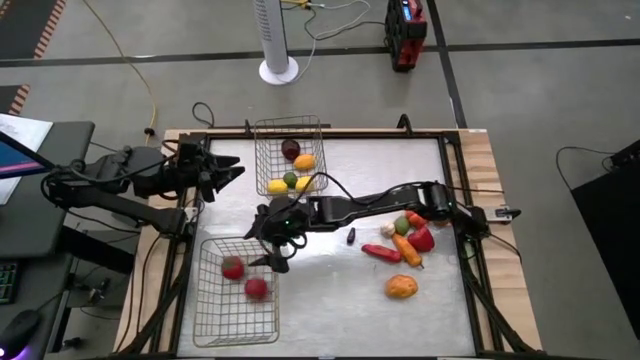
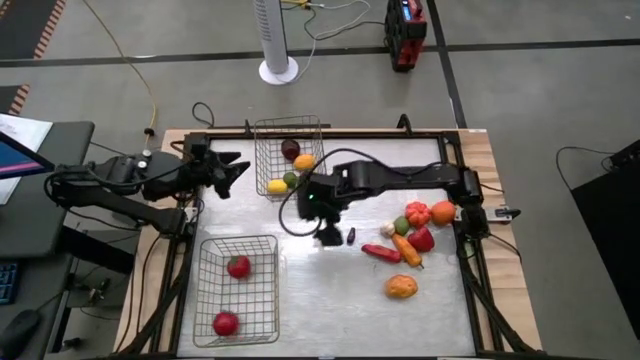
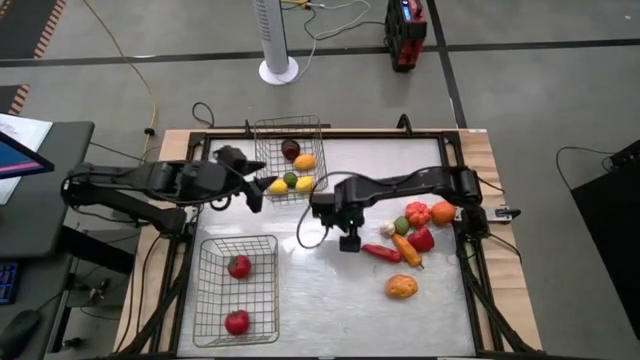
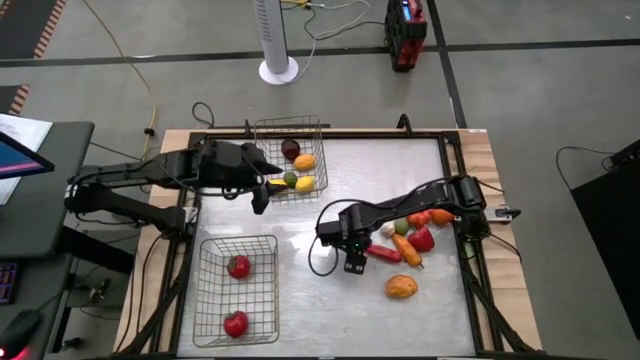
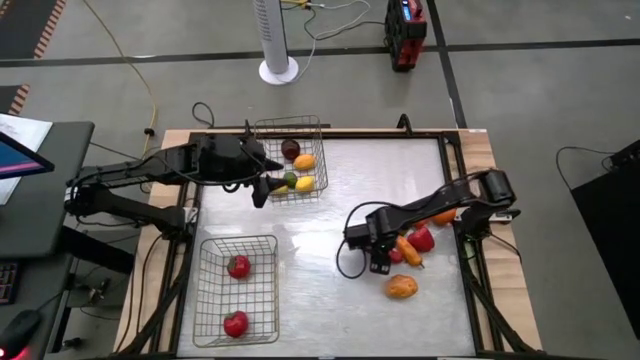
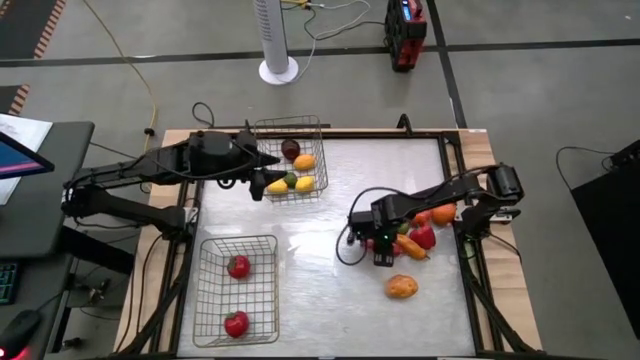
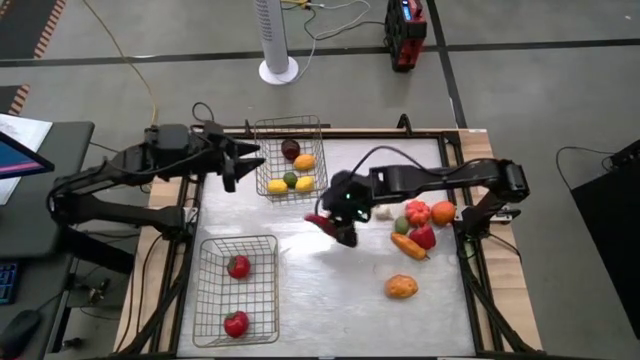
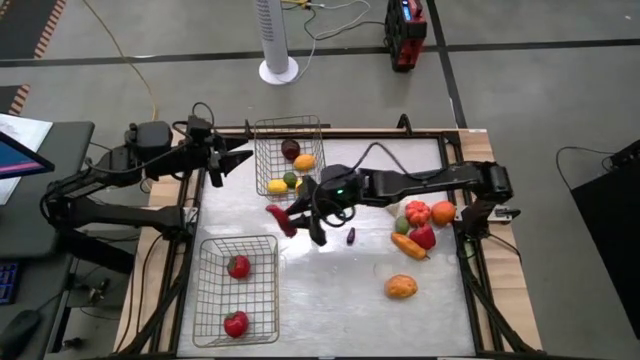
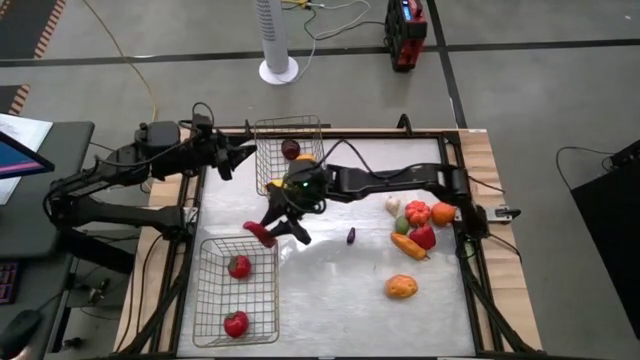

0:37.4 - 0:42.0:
Task: Sort produce into baskets
Put the red chili pepper into the bottom wire basket

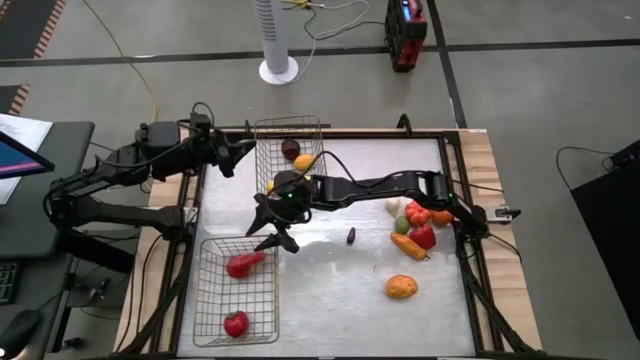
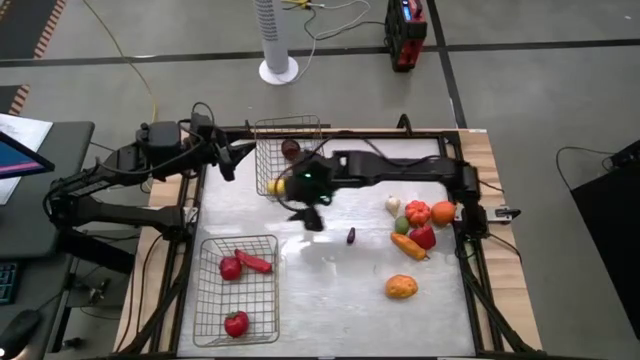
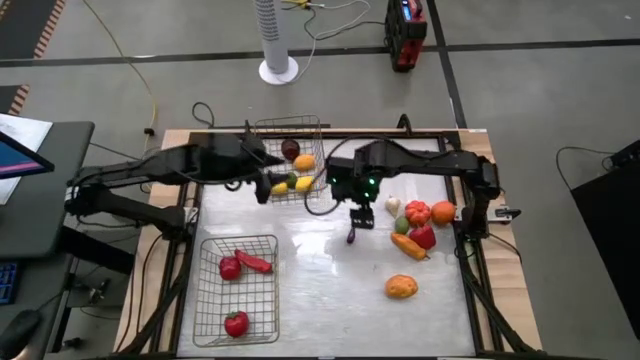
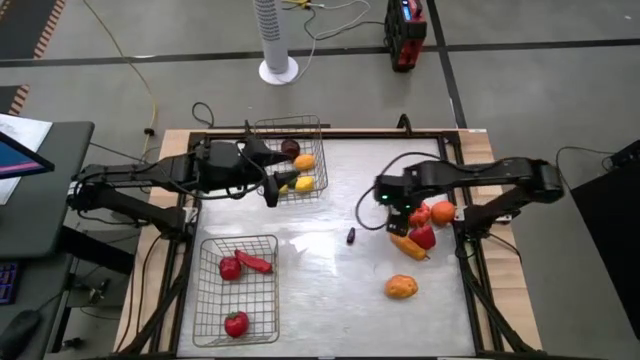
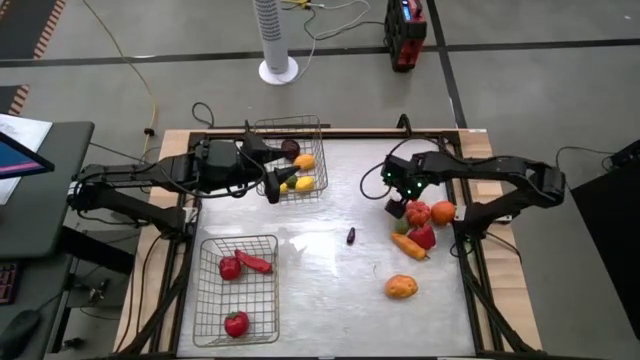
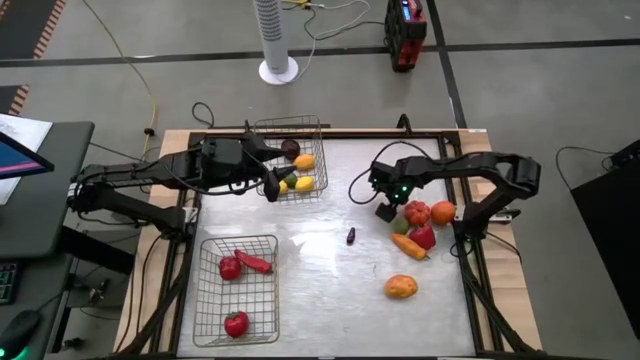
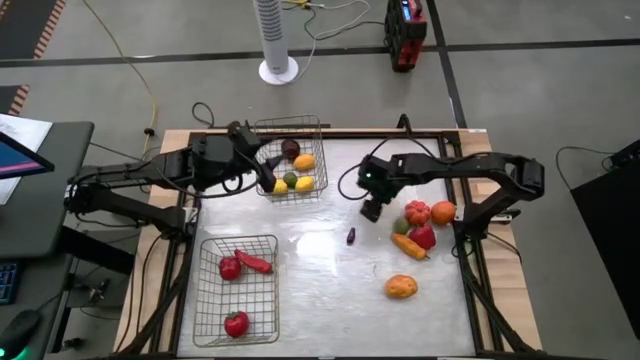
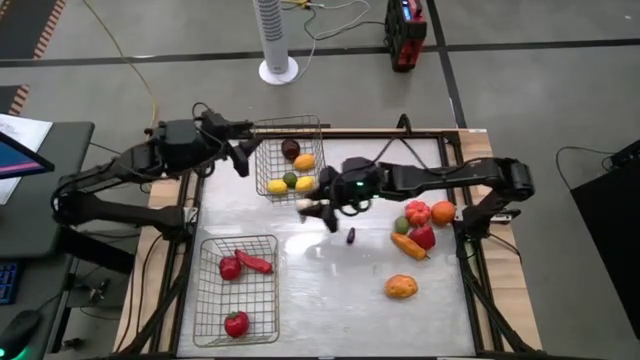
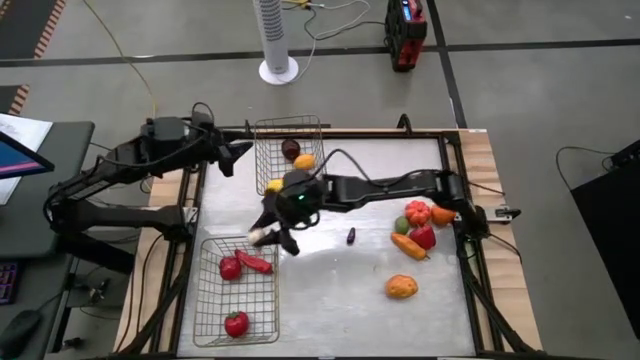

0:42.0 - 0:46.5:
Put the white garlic into the bottom wire basket

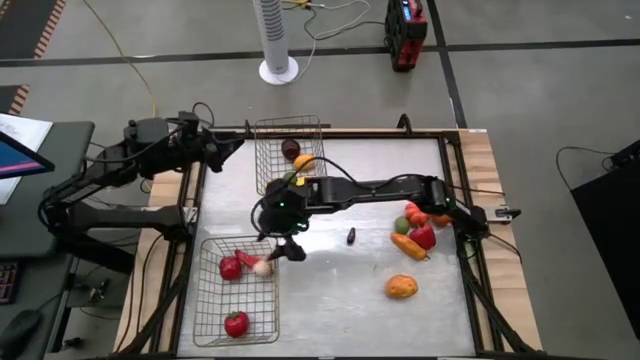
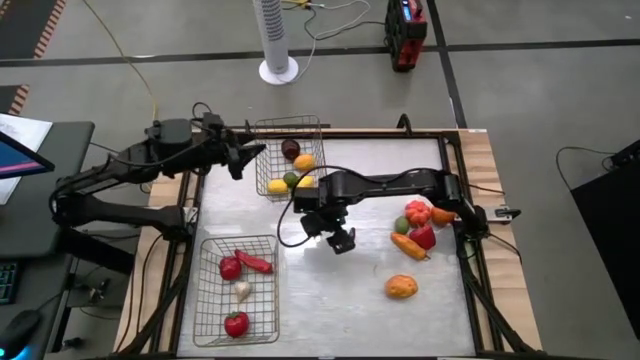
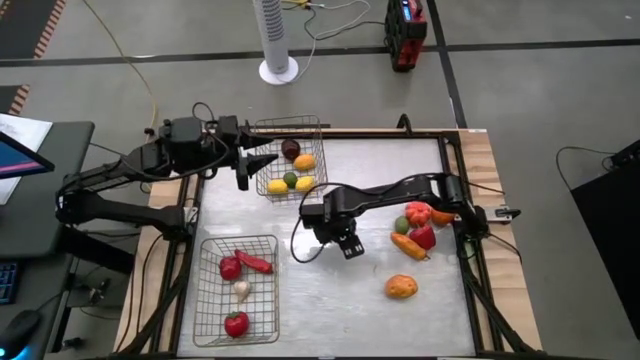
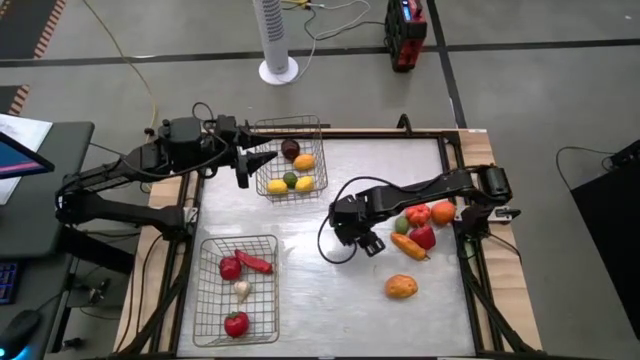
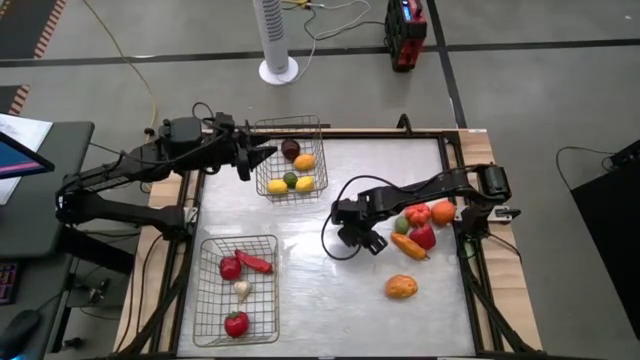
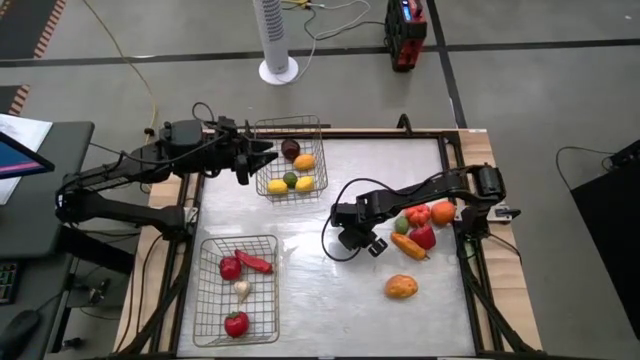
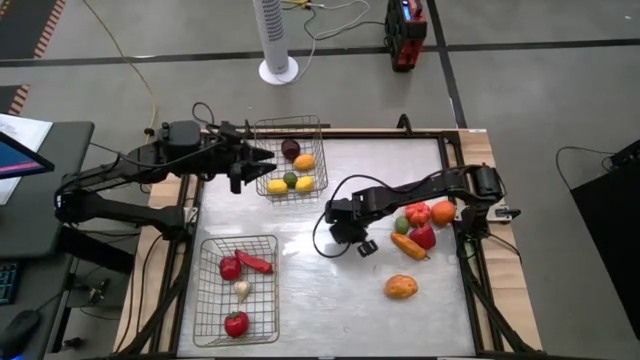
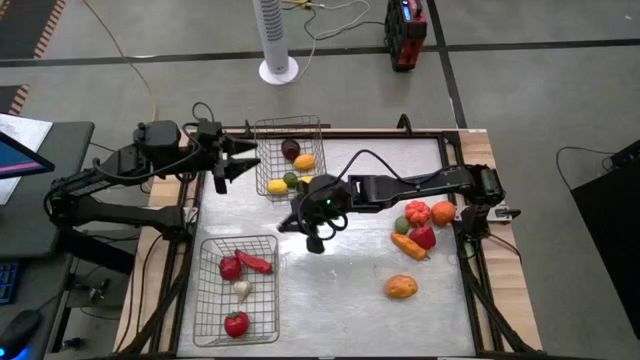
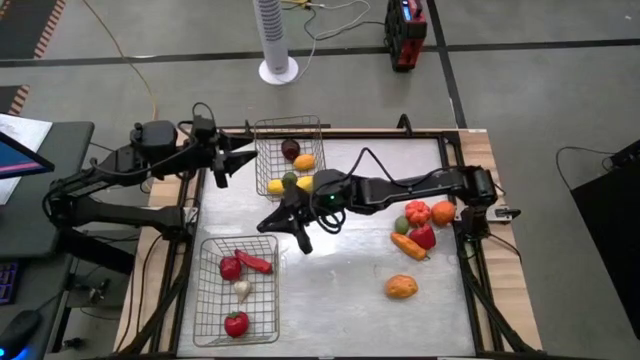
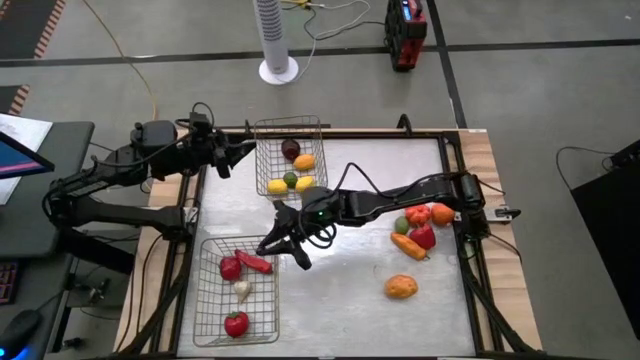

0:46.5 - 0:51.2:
Put the purple eggplant into the bottom wire basket

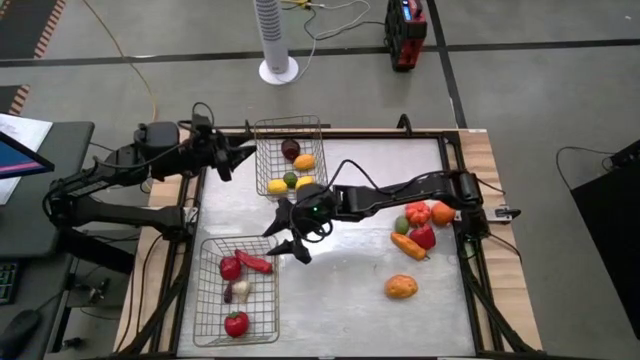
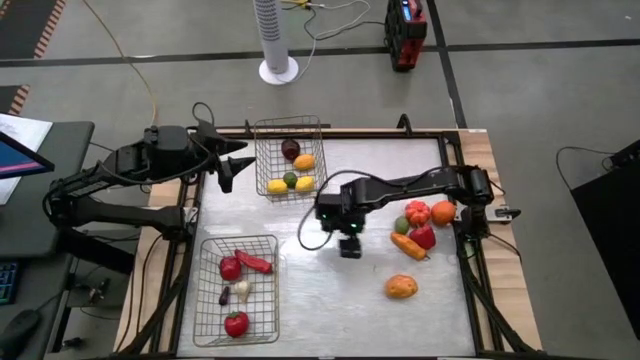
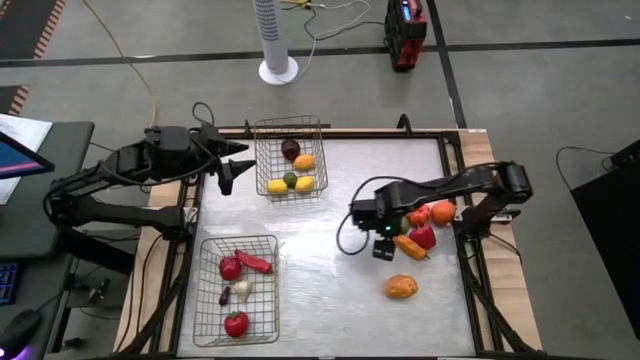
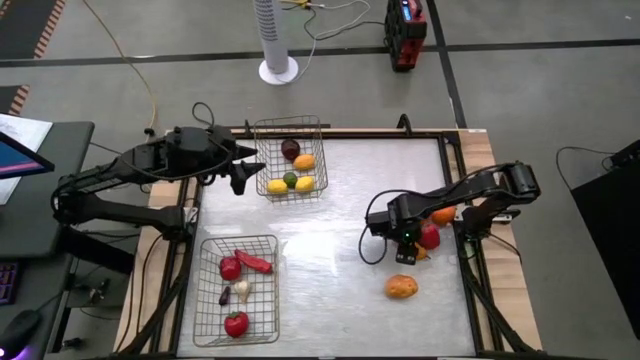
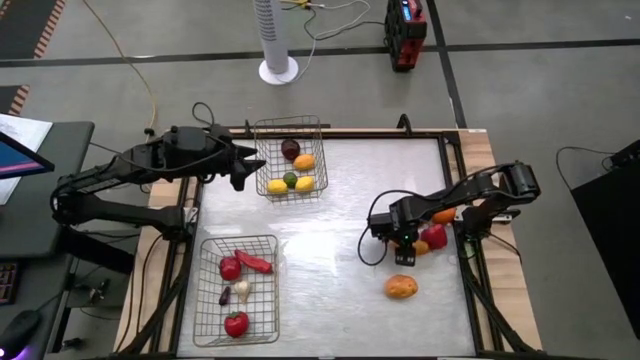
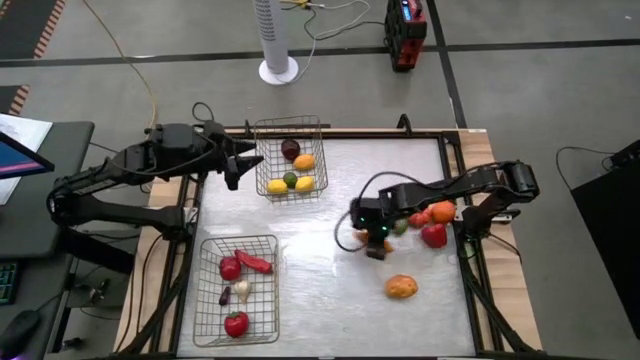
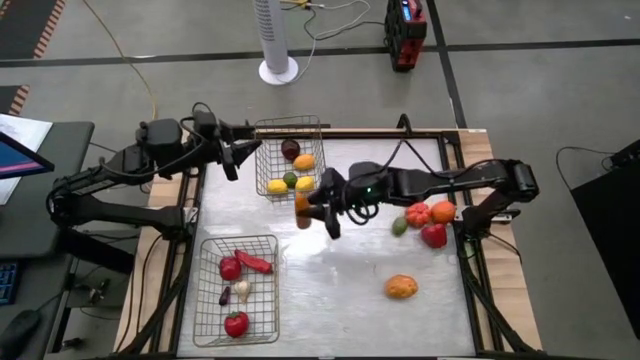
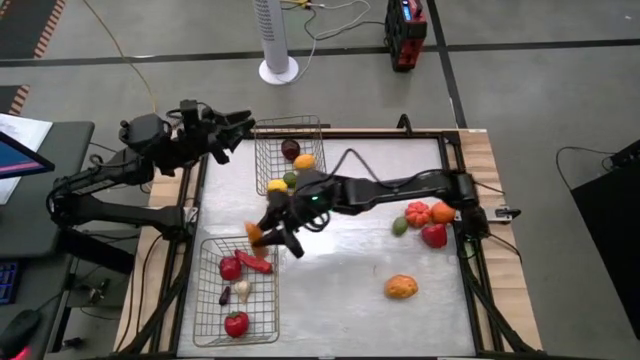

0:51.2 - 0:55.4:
Put the yellow pepper into the bottom wire basket

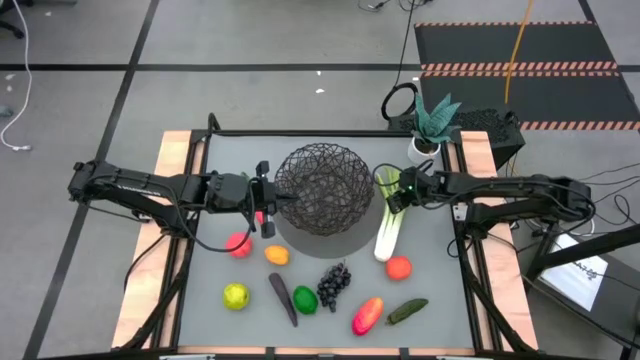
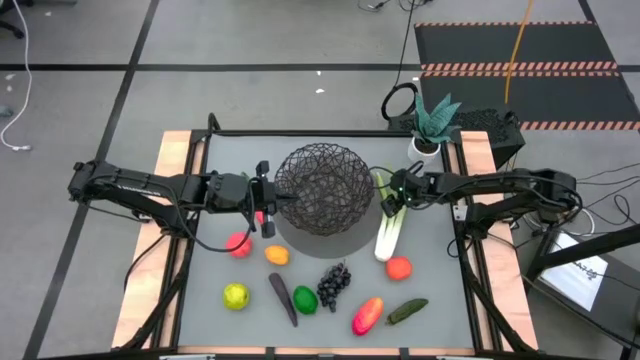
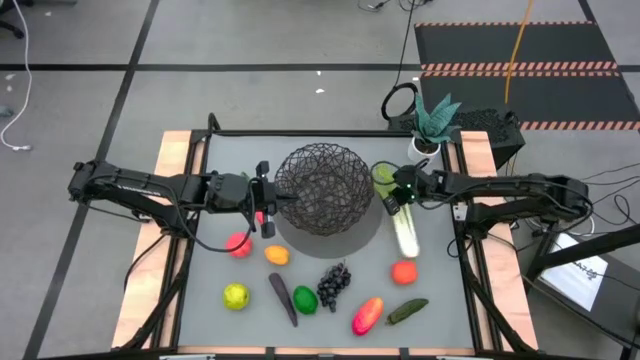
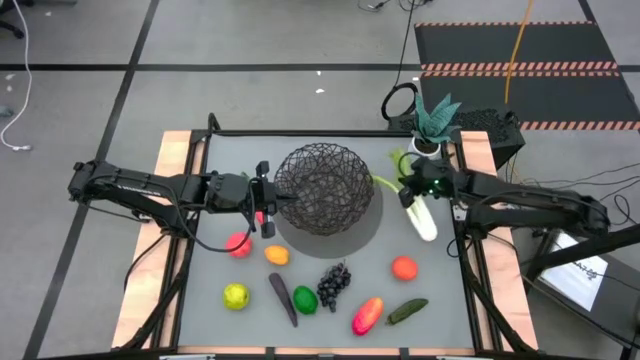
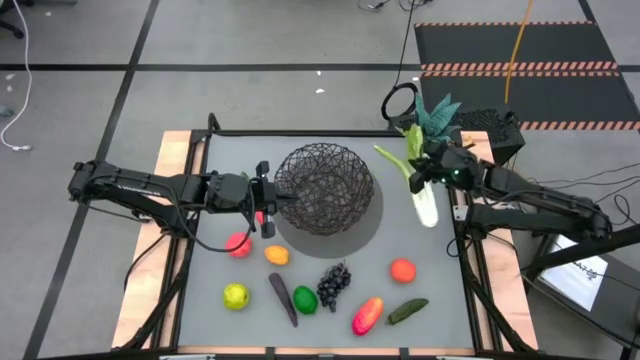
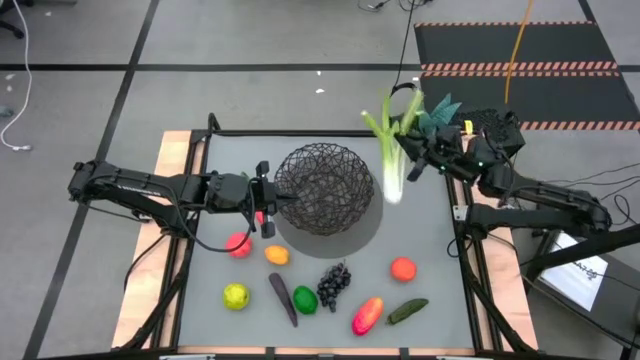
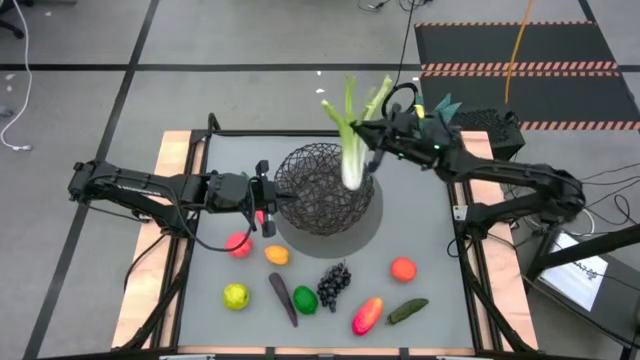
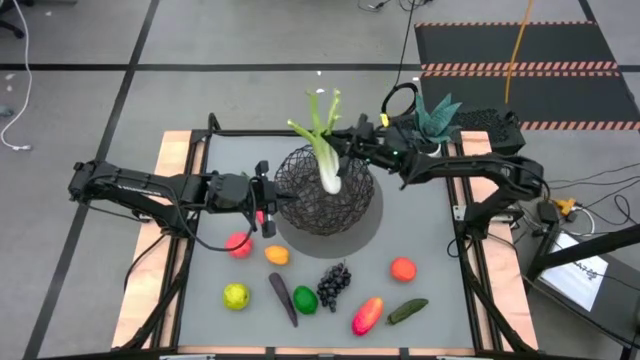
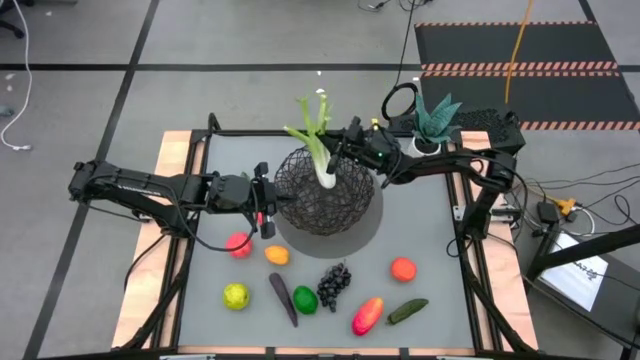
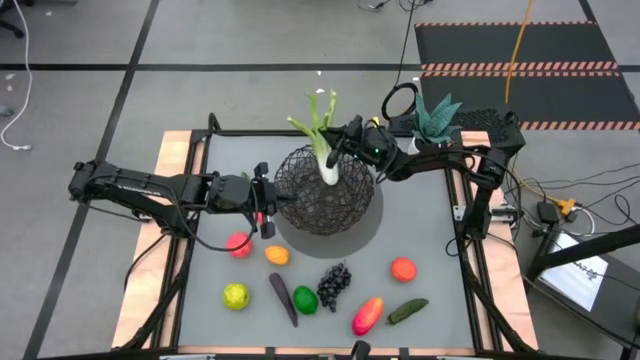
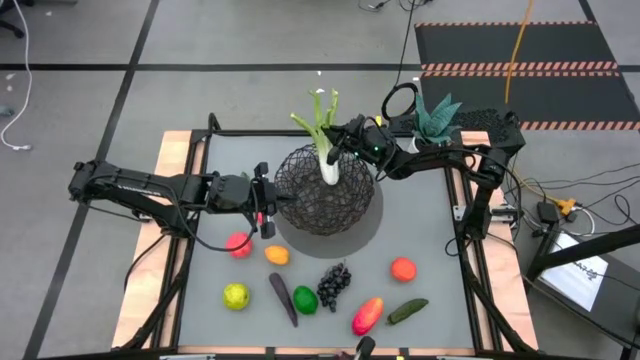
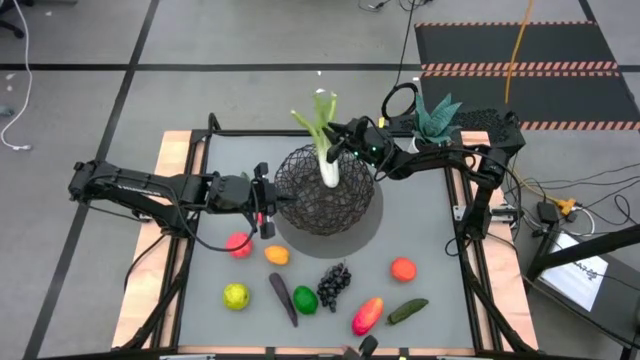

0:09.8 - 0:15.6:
Task: Build produce basket
Put the green celery into the black woven basket
